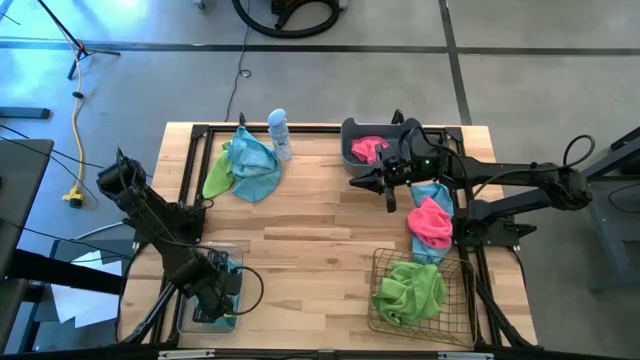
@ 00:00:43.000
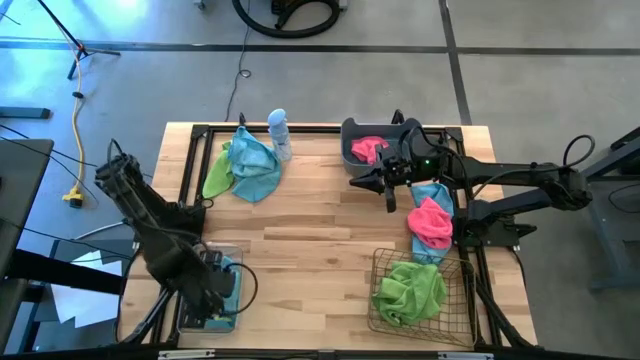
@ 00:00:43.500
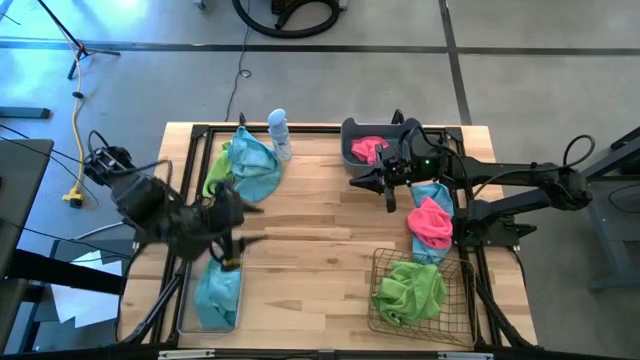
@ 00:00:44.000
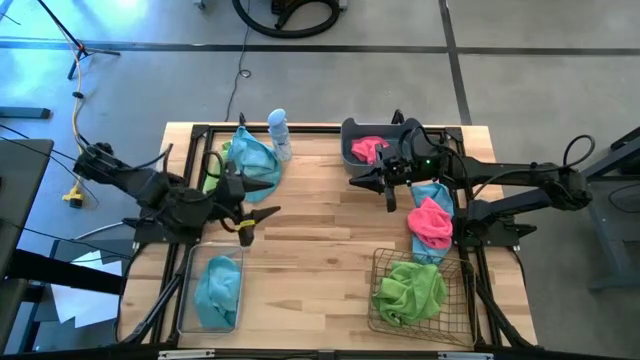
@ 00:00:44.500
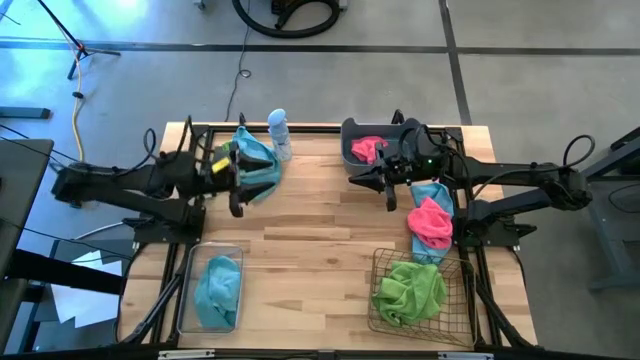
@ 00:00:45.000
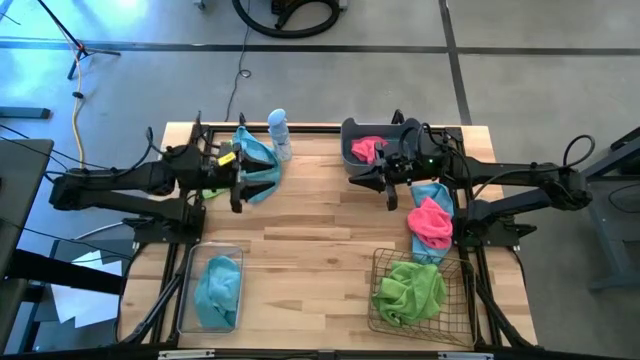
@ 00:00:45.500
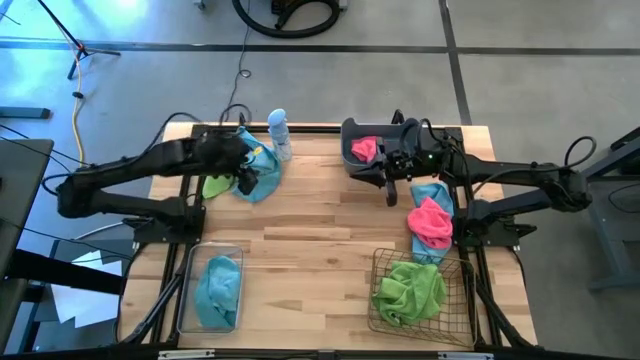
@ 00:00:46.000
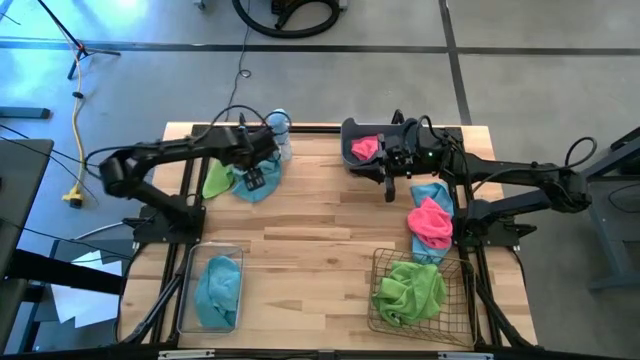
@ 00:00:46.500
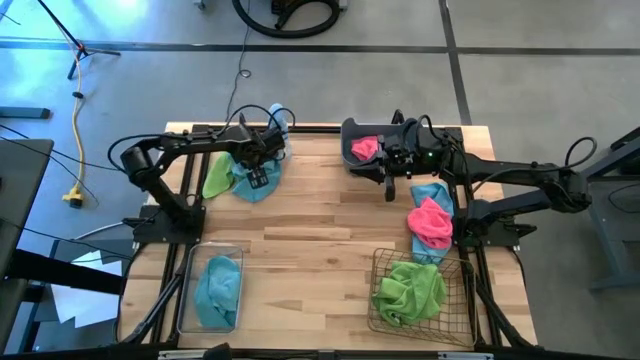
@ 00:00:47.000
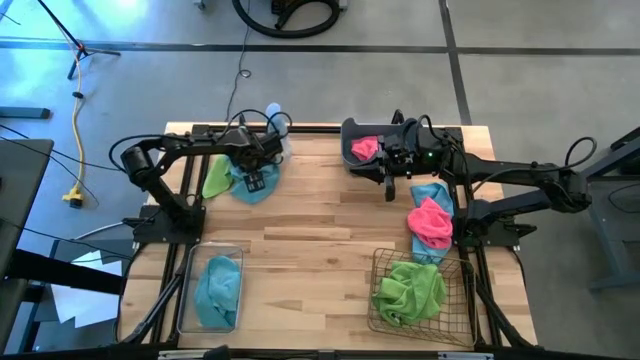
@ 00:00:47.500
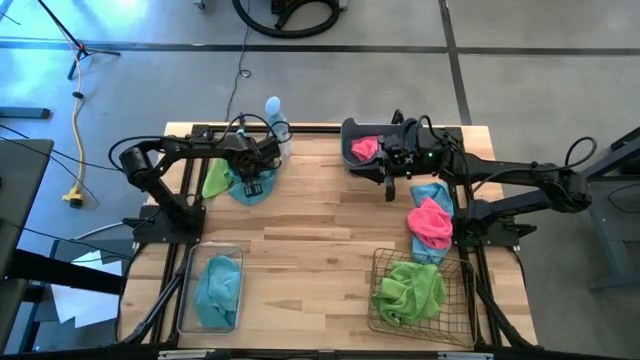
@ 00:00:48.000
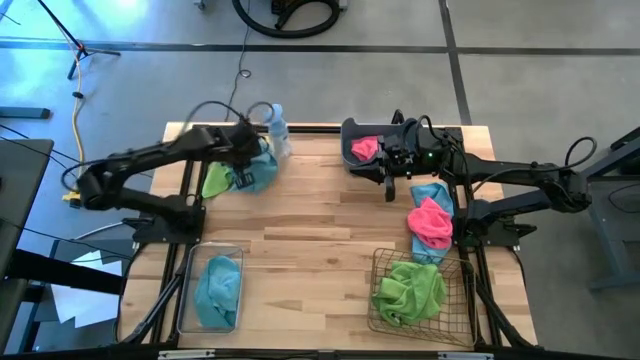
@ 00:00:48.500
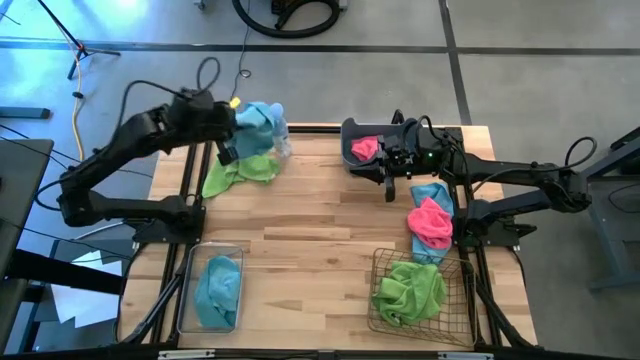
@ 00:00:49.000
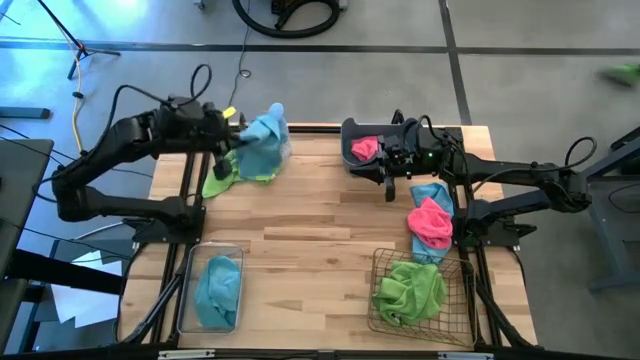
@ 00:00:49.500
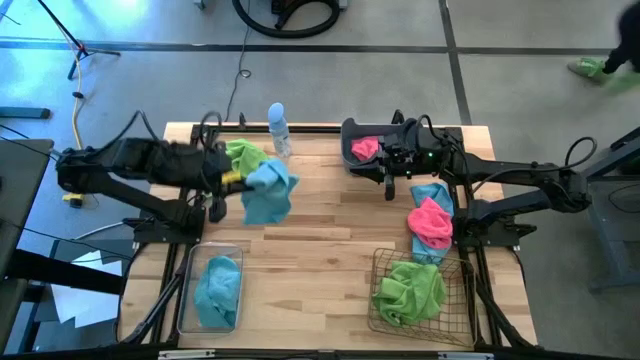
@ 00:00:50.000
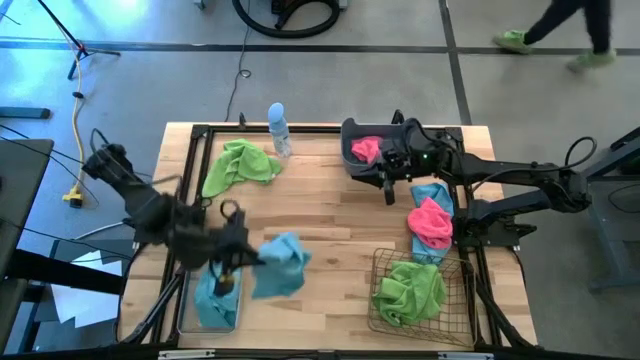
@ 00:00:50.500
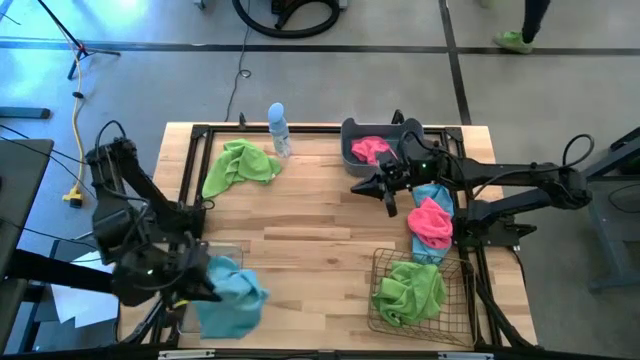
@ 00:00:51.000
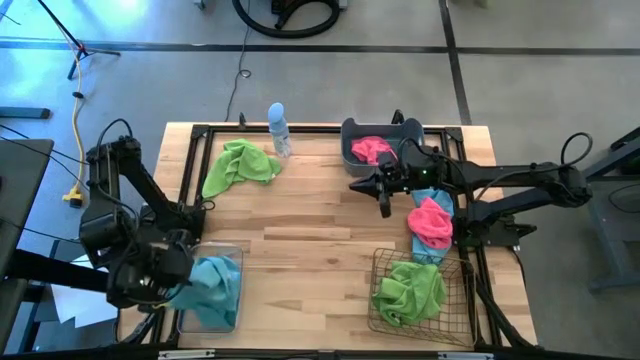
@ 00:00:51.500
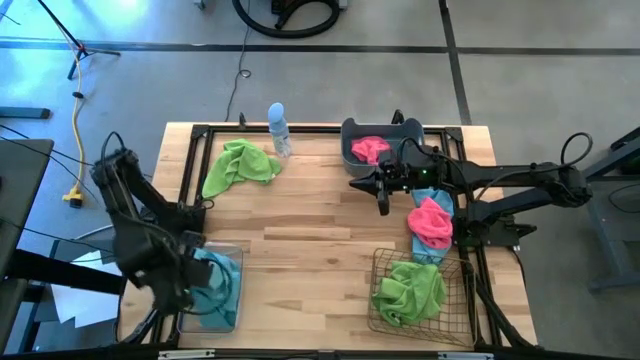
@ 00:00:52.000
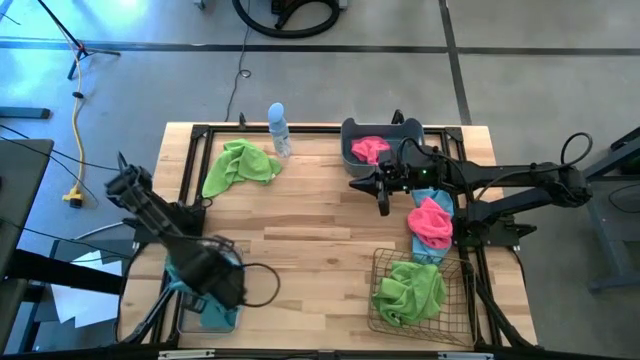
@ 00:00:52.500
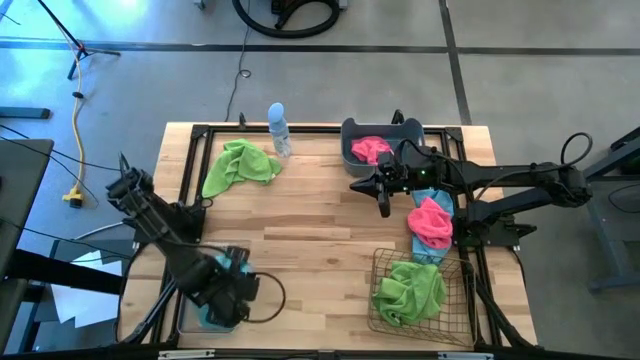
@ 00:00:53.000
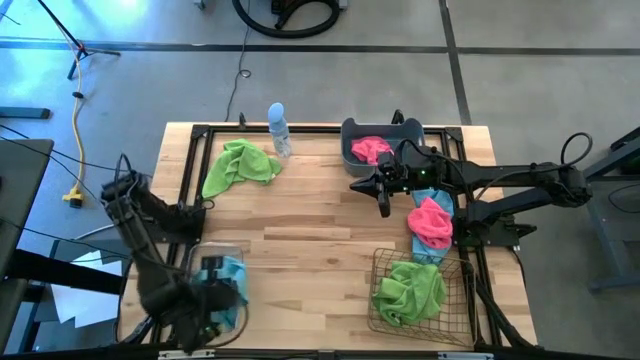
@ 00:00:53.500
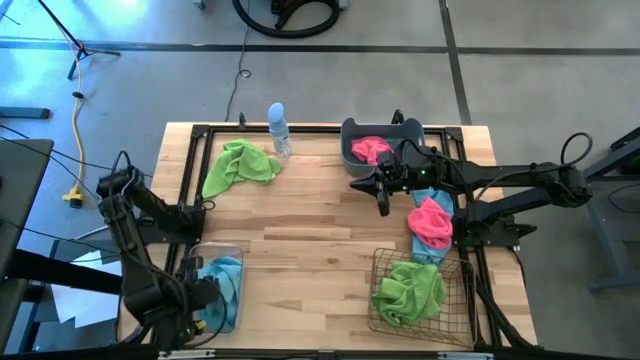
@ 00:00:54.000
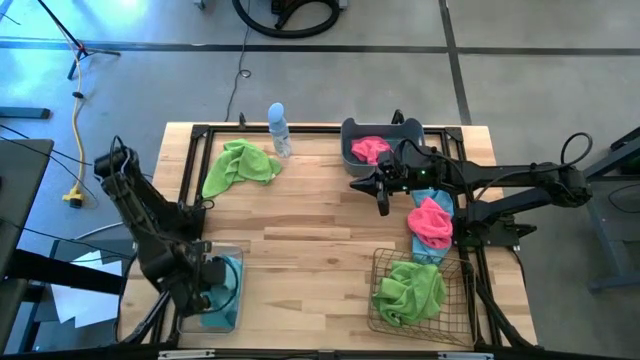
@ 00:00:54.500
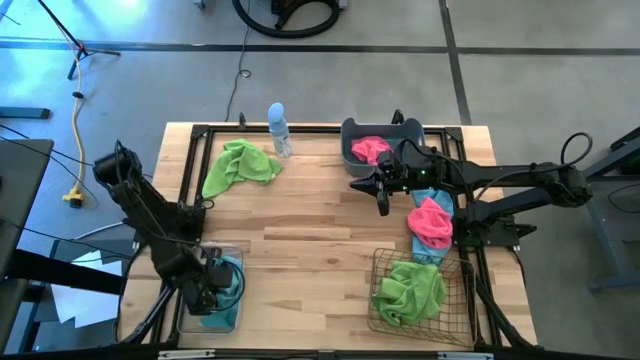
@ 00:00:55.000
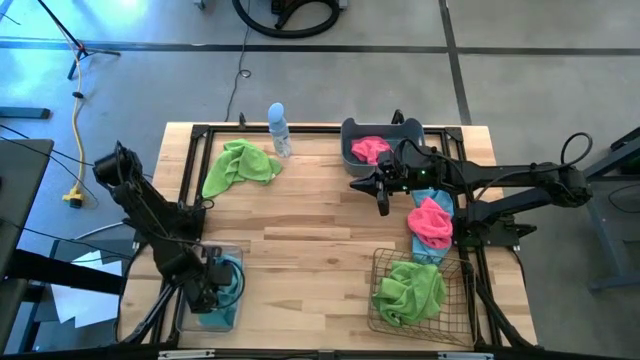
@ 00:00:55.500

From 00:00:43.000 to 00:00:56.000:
Task: Sort microfiber towel by color & place in baskets
Put the top left blue microfiber towel into the transparent bin

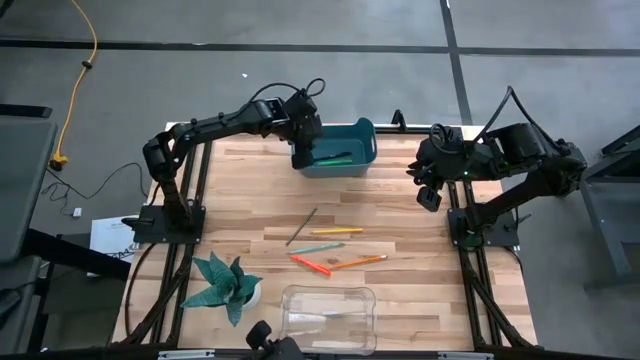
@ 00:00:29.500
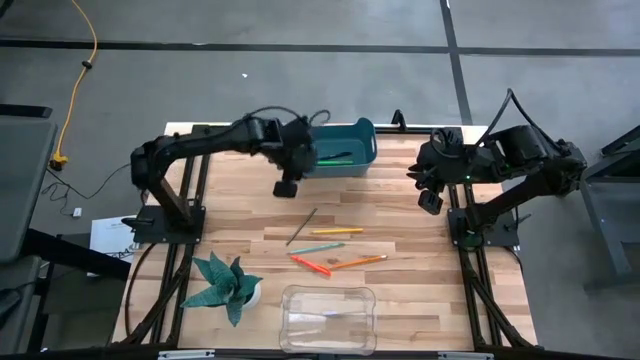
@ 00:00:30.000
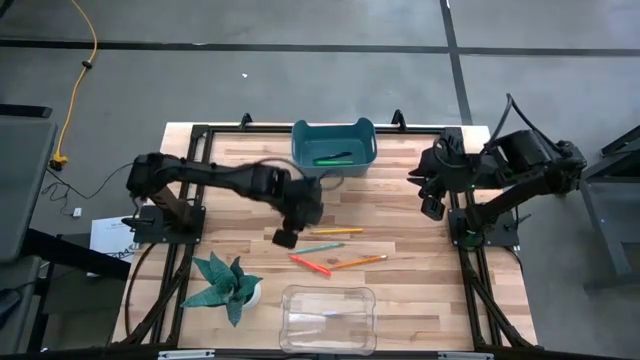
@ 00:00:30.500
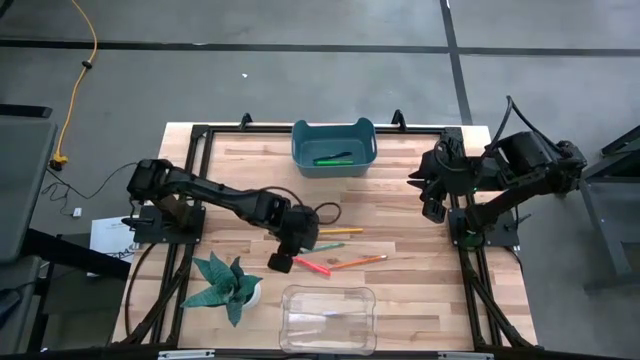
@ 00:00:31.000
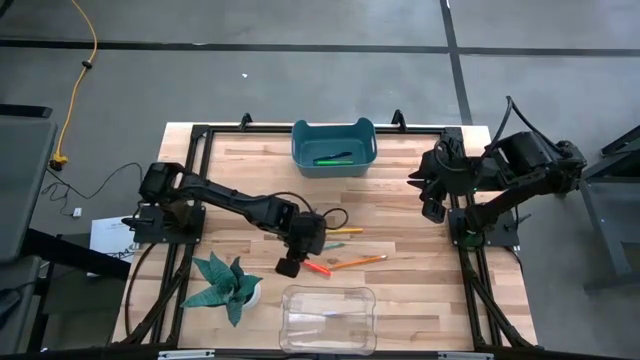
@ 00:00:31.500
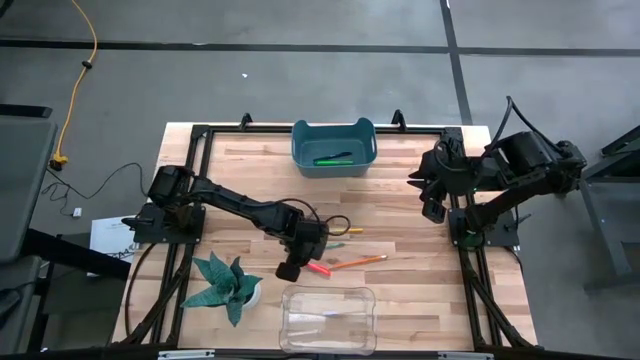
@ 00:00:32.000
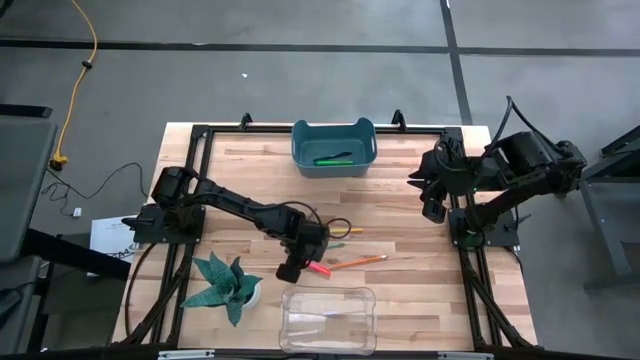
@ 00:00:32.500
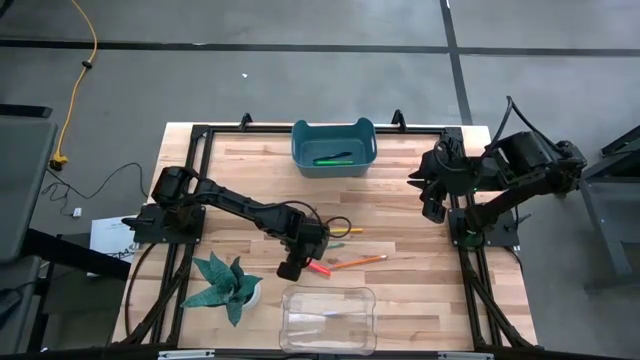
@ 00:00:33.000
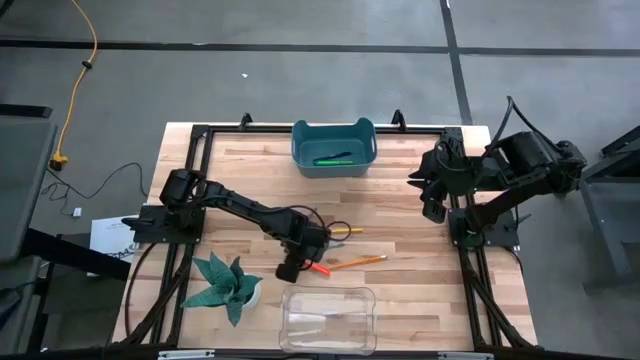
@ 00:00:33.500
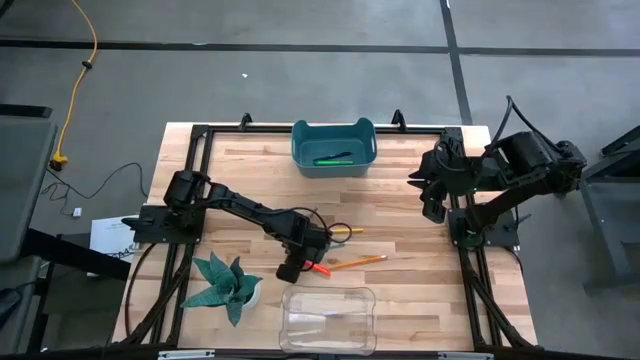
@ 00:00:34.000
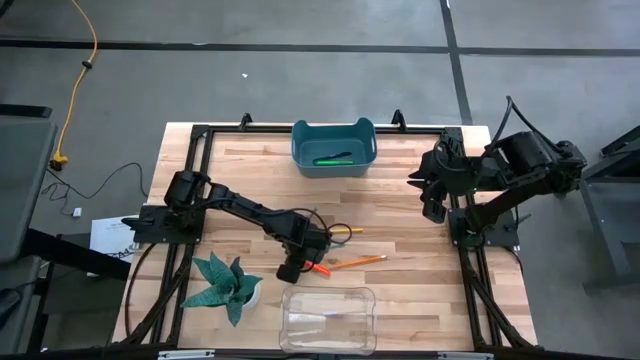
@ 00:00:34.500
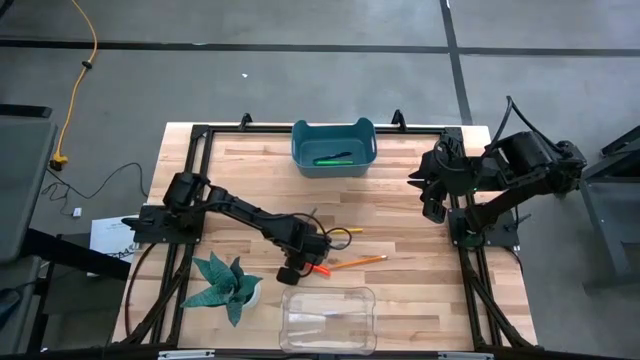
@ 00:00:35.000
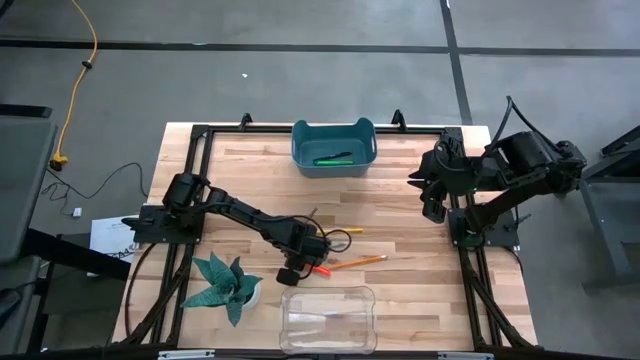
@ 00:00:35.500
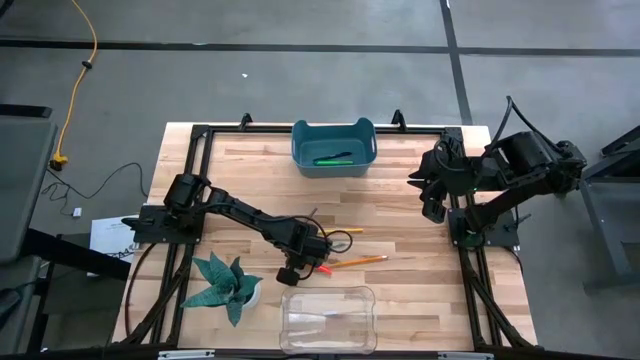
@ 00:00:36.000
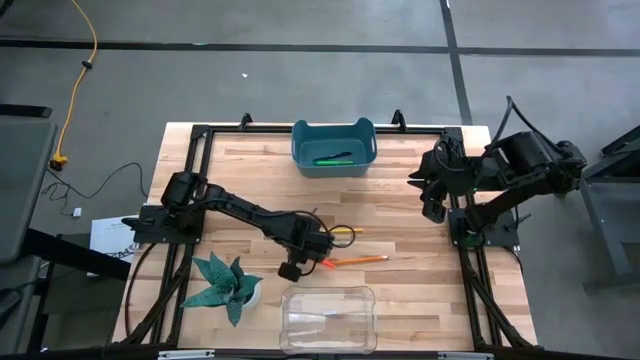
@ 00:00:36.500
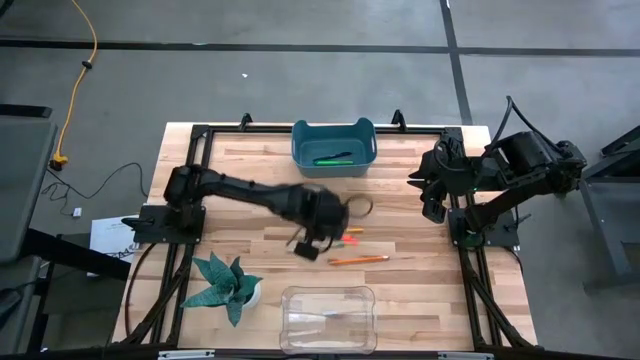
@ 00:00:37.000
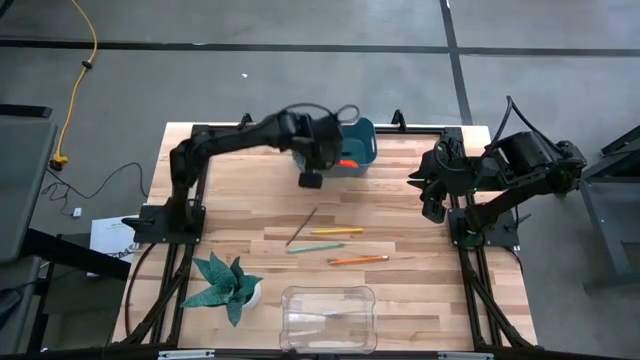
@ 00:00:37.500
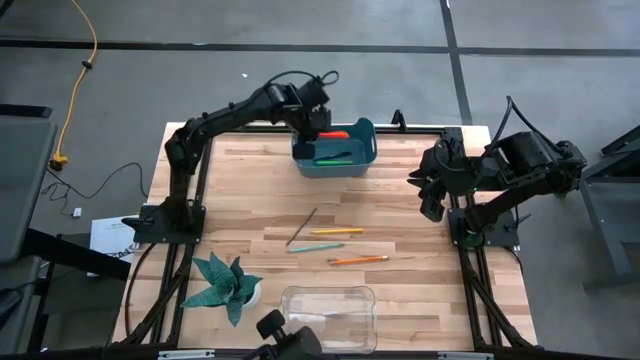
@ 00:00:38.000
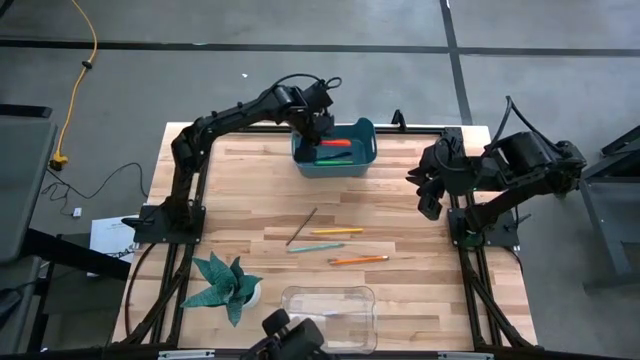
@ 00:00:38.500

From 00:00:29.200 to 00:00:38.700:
Task: Sort pens & pencils
Put the orange pen into the dark blue bin
